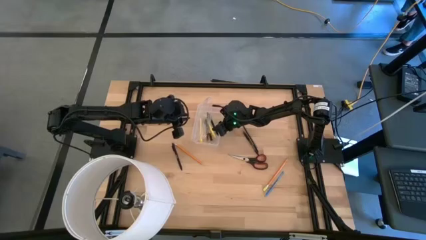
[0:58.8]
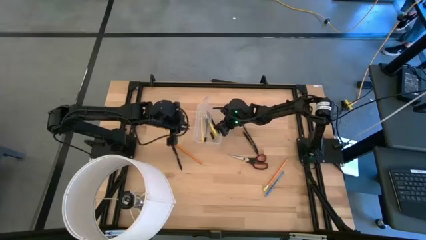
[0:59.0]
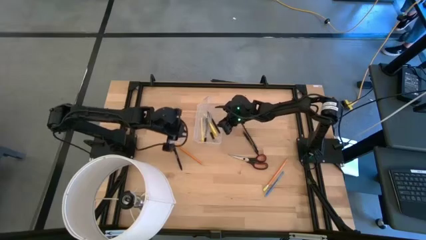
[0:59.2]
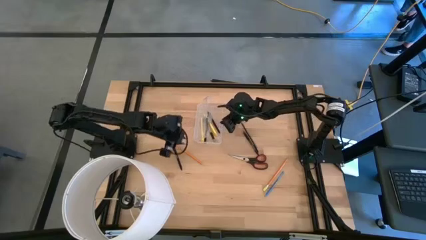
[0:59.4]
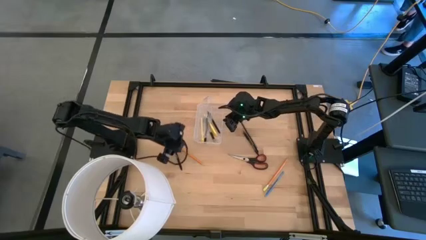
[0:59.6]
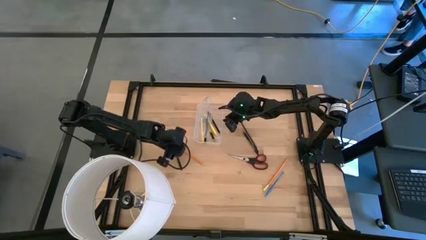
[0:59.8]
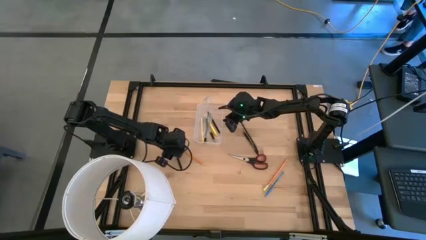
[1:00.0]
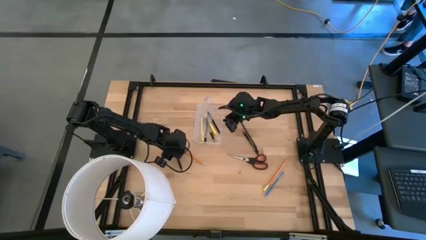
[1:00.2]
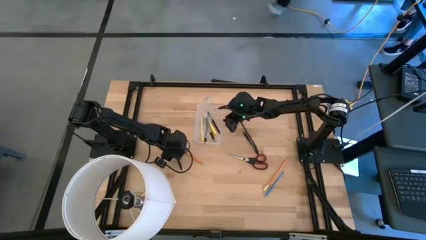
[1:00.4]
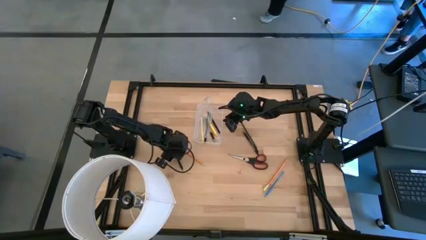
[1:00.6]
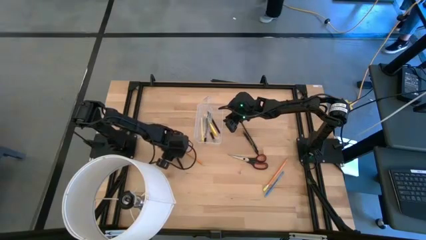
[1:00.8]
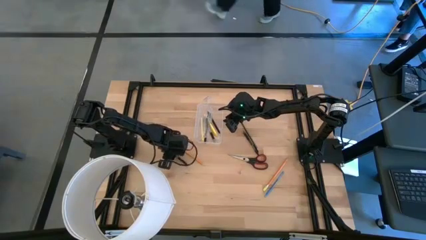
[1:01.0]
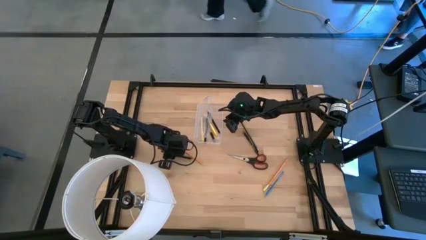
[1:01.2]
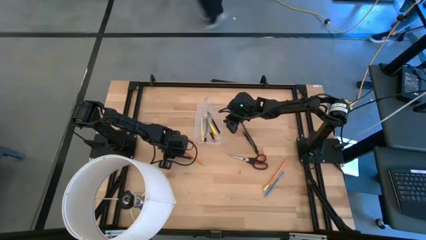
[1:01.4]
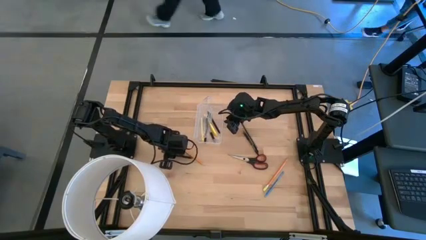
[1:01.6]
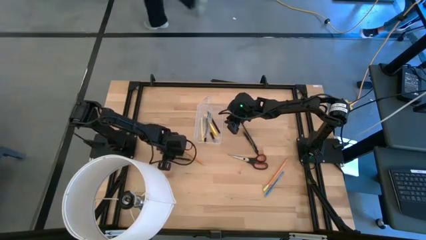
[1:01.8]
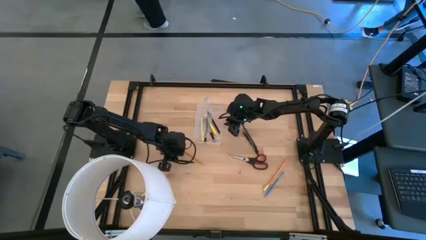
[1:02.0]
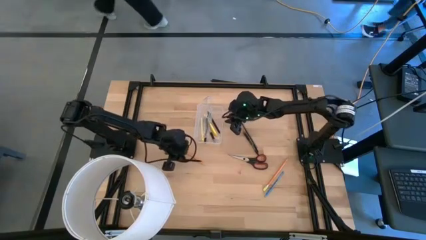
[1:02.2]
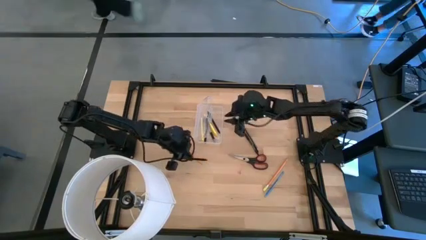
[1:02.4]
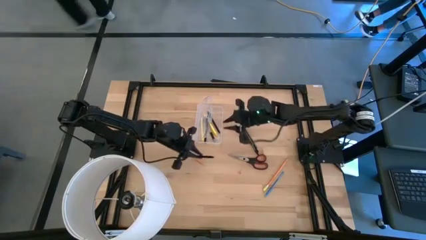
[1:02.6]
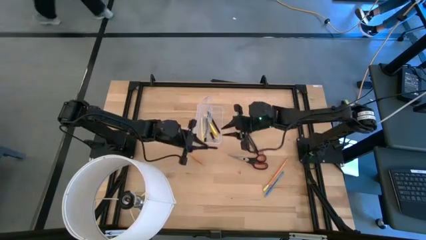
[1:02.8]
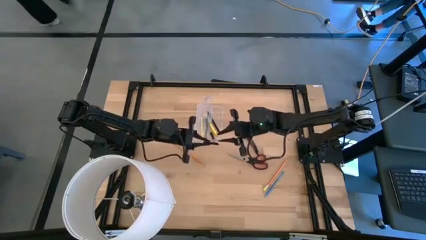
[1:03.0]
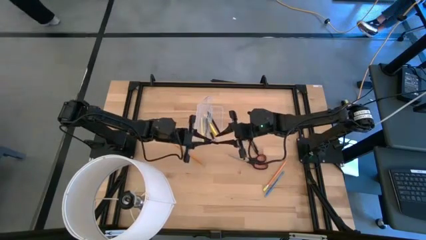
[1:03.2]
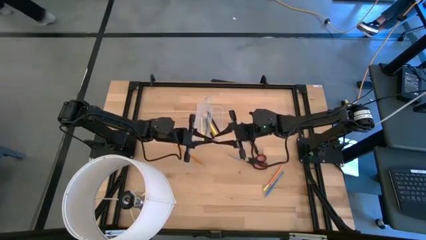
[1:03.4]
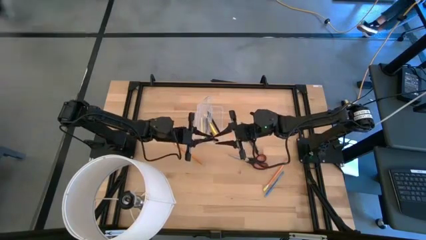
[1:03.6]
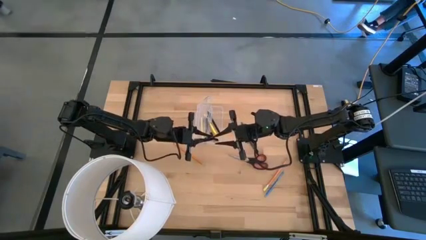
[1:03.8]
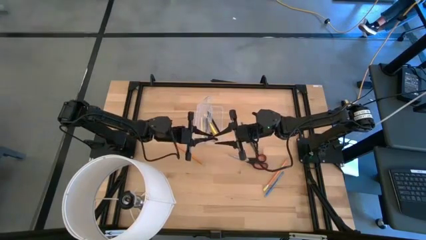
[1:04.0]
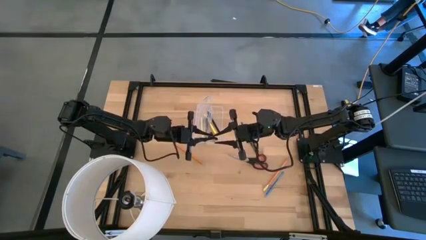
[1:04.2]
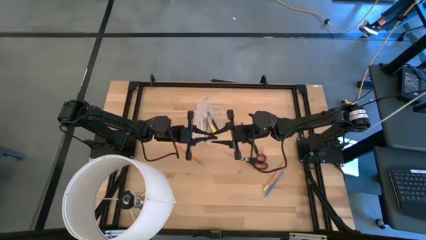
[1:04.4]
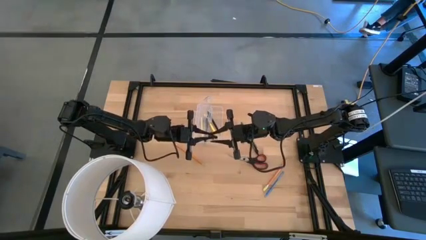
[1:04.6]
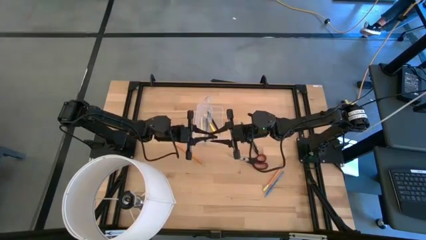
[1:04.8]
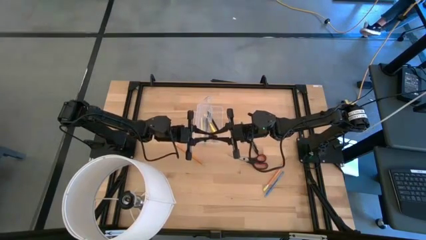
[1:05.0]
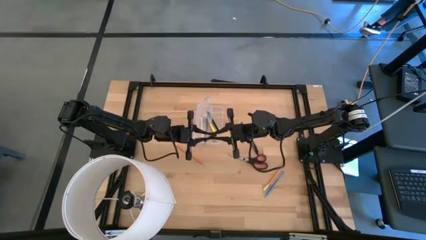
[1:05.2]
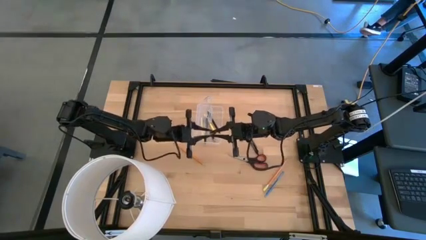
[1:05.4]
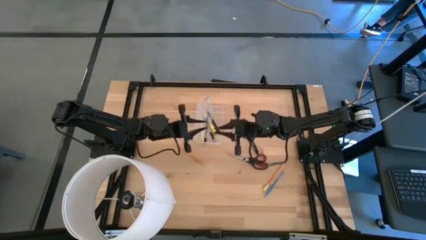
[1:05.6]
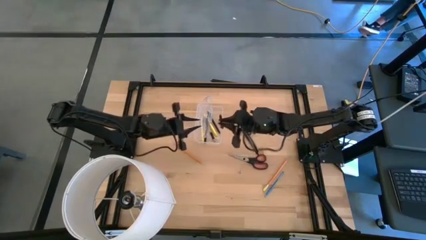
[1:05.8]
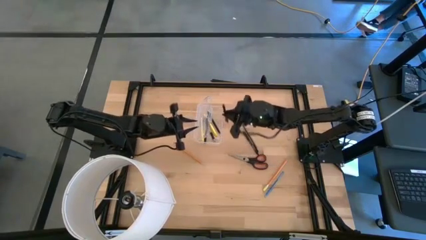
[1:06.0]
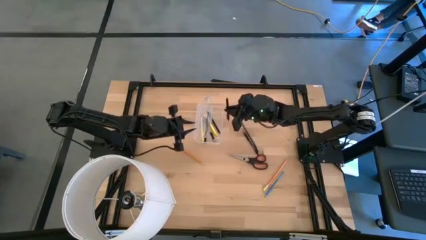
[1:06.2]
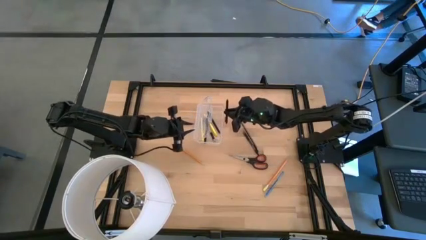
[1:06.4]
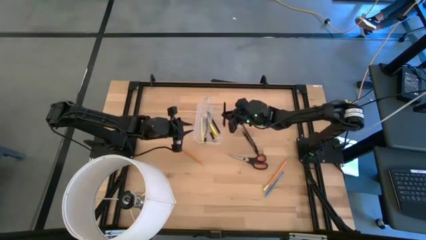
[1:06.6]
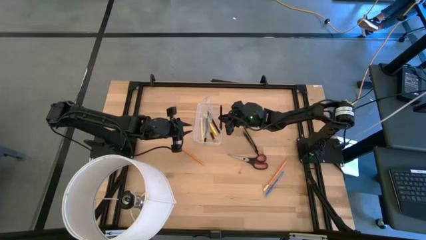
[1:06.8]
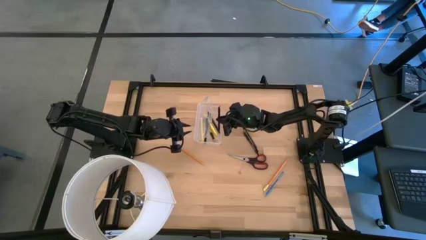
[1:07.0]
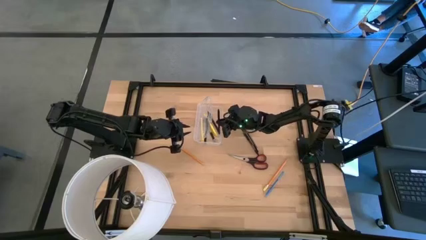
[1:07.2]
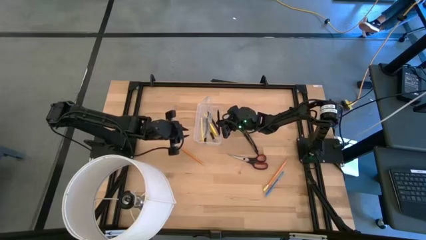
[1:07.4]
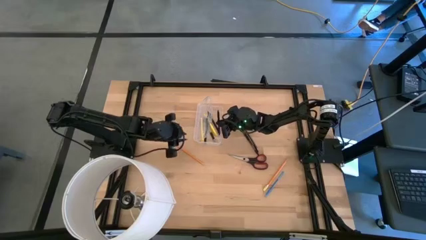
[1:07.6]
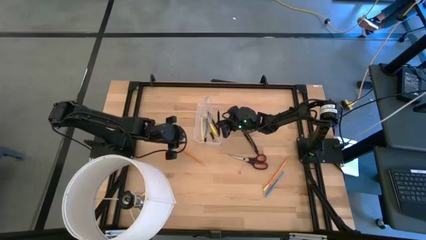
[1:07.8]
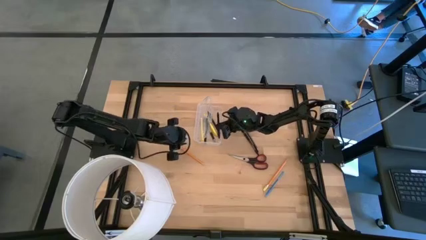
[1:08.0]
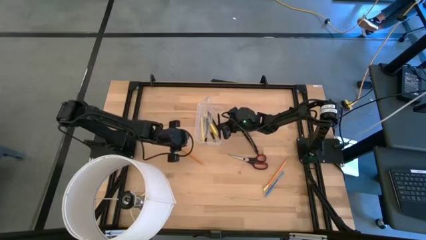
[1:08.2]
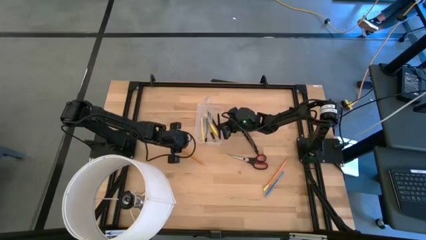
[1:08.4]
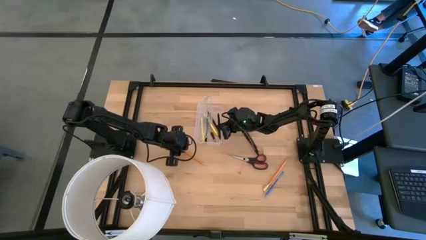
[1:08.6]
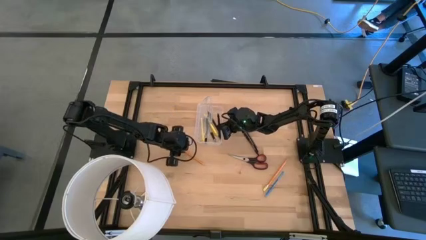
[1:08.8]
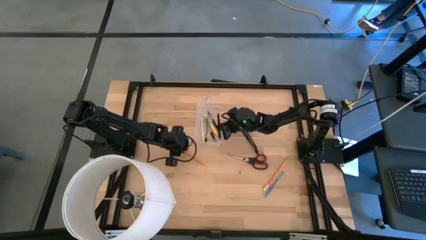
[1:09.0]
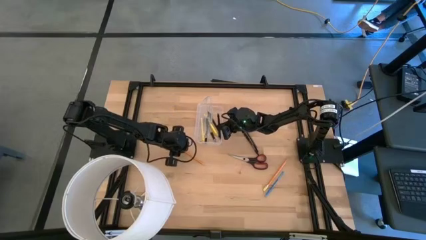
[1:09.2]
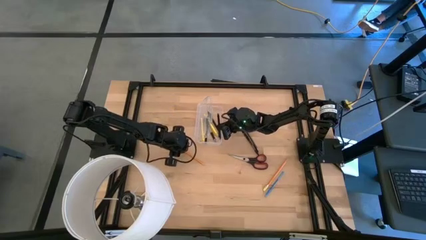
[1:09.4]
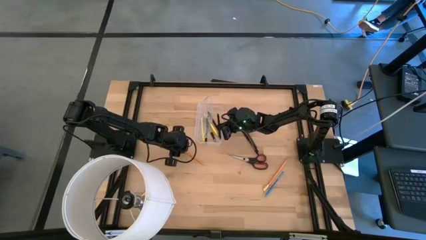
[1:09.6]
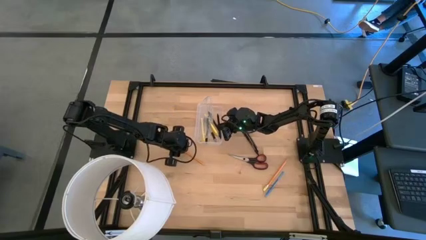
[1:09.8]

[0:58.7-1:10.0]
Task: Pick & place school supplies into a supply box
Put the black pen into the transparent supply box

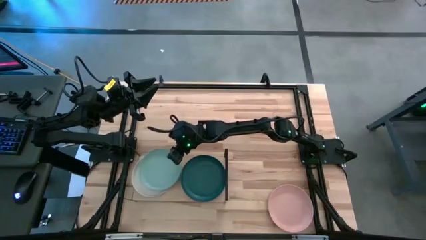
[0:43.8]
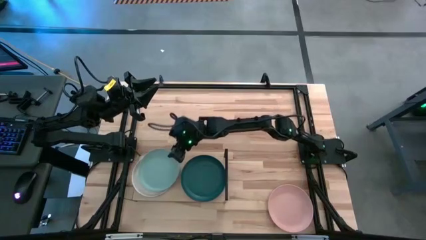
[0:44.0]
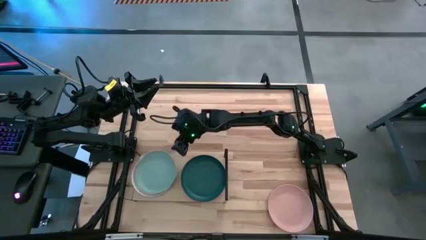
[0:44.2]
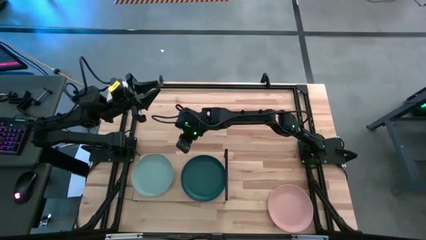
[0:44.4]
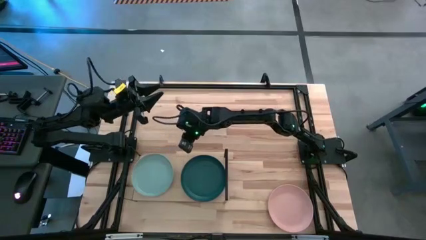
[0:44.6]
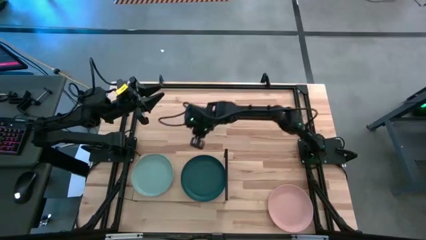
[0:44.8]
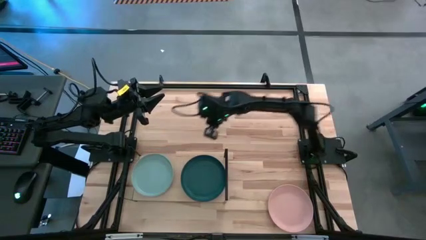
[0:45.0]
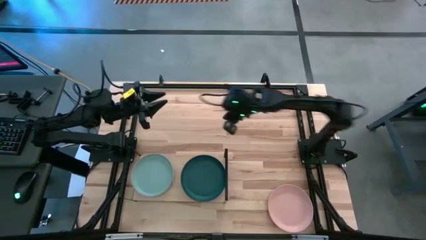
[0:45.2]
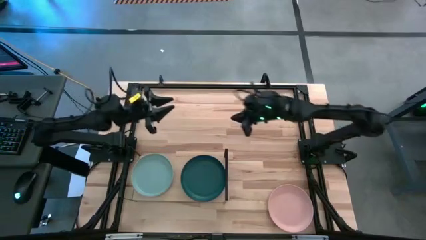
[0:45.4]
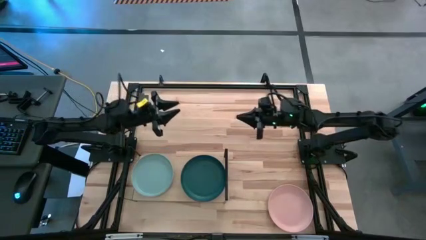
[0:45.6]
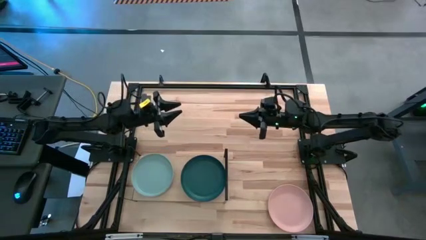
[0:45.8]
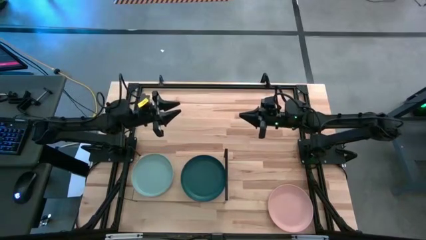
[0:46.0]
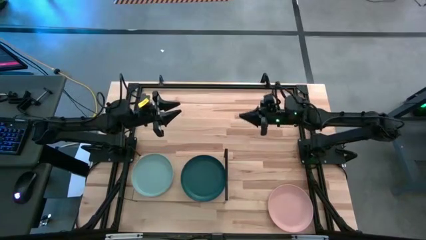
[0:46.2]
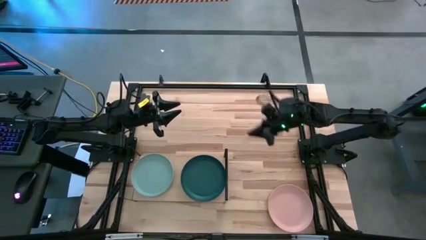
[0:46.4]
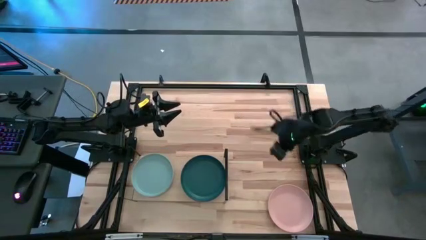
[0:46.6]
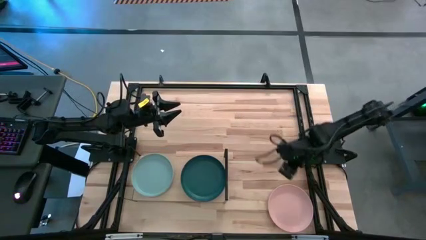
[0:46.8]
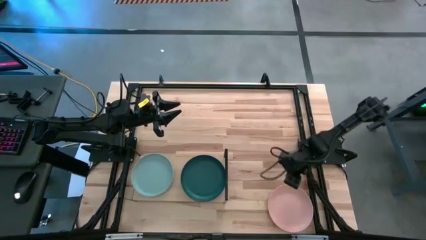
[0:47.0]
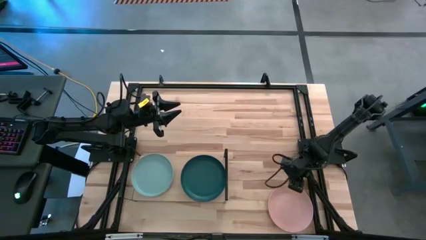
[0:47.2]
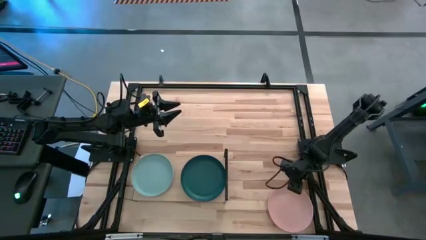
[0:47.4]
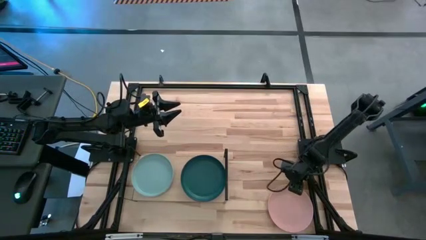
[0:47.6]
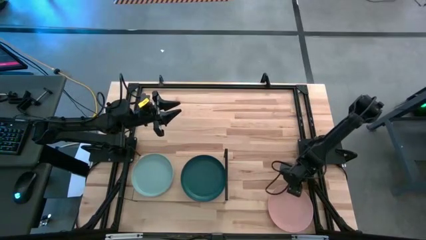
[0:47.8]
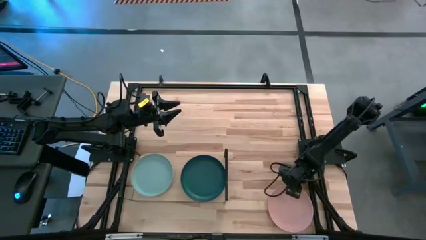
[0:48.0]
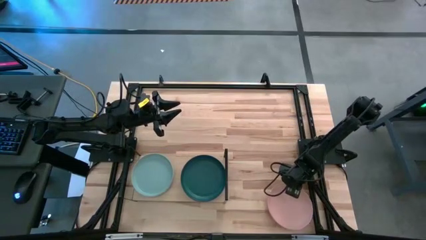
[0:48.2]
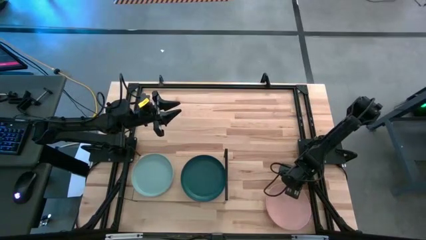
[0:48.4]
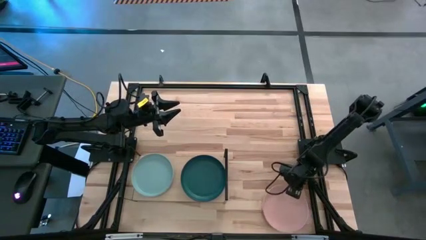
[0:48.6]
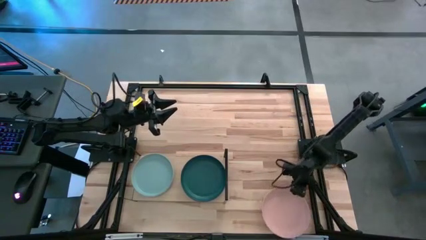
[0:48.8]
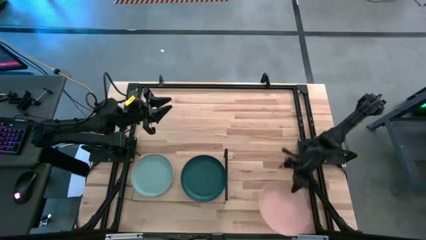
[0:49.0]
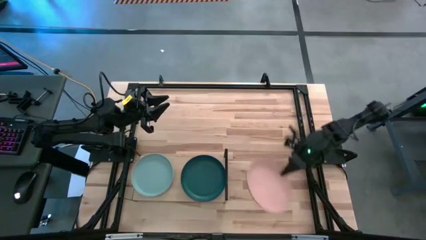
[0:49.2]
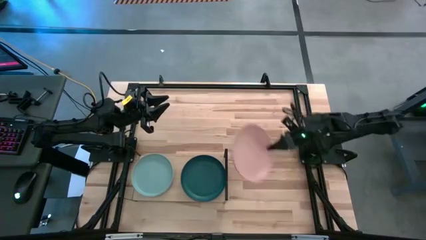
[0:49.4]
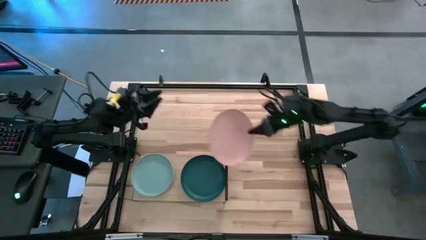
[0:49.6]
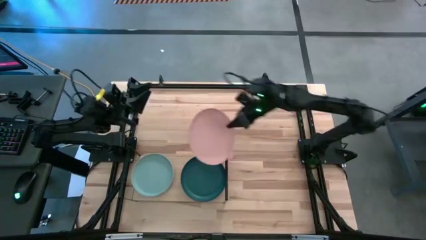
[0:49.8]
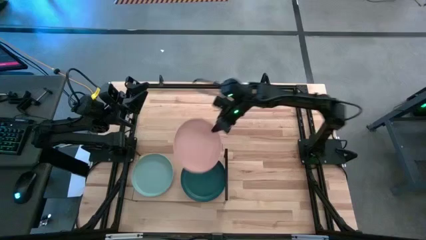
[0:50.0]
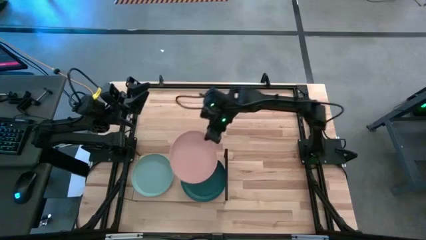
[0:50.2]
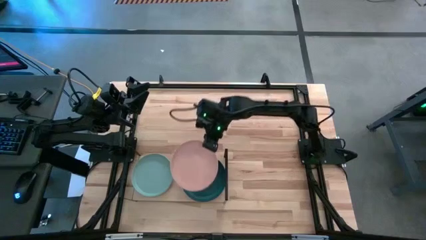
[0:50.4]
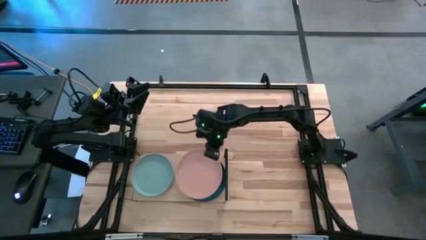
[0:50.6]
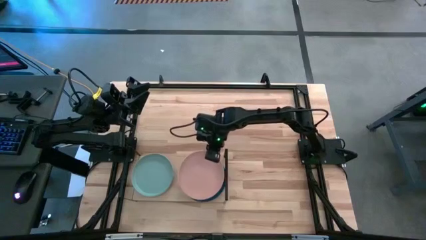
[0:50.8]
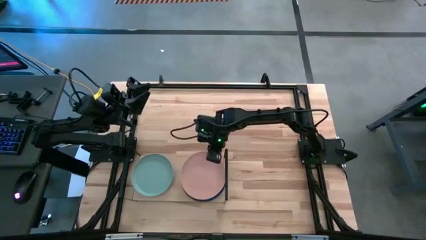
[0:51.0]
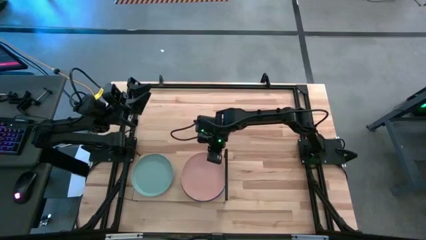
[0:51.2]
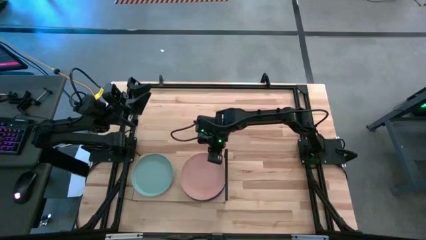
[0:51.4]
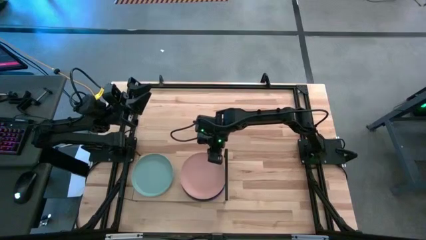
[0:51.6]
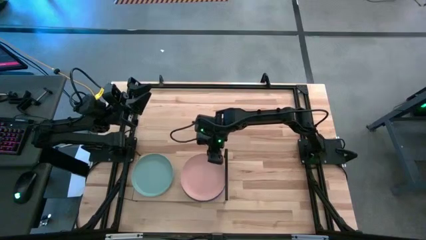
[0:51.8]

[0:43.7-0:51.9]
Task: Place and stack plates onto a shelf
Stack the light pink plate on top of the blue plate on the shelf
